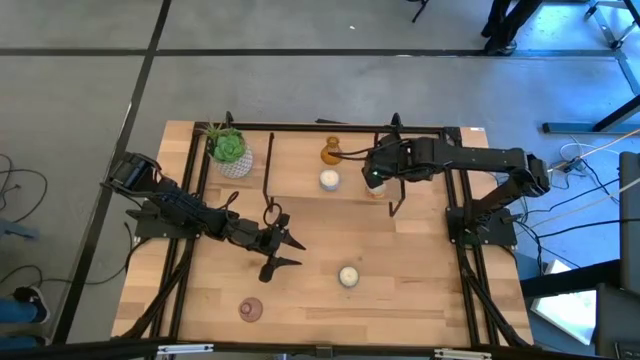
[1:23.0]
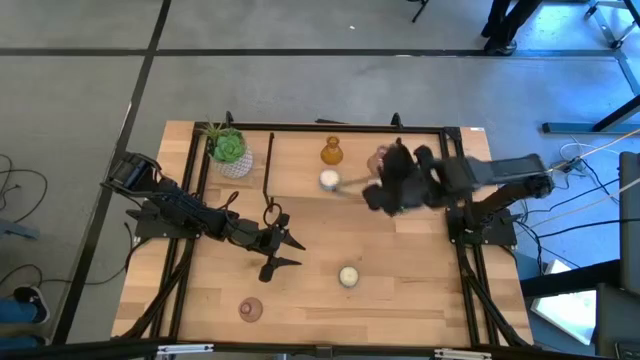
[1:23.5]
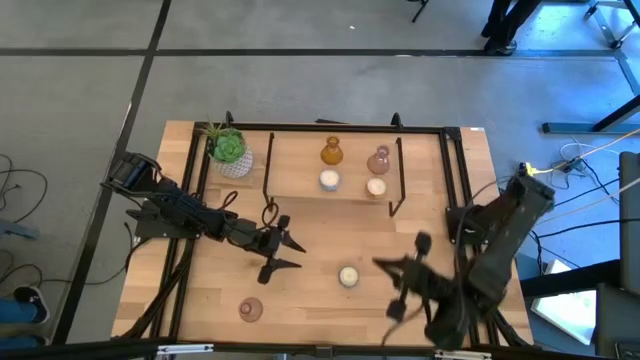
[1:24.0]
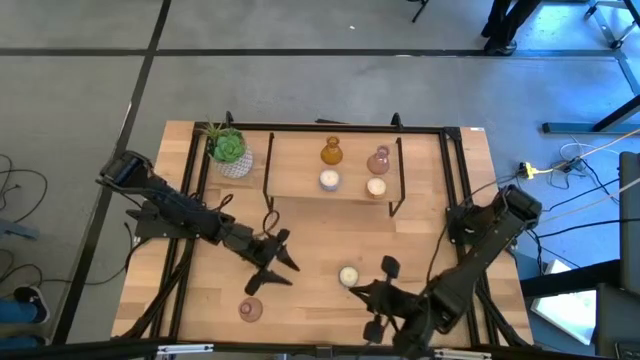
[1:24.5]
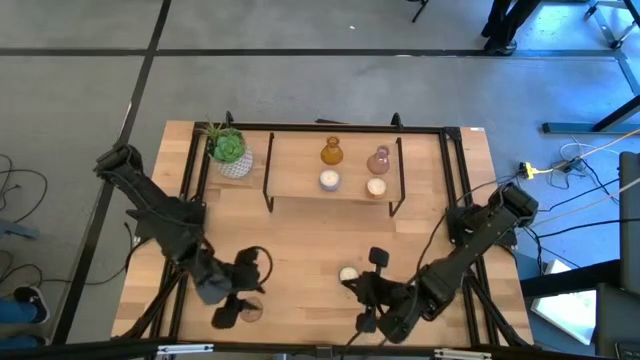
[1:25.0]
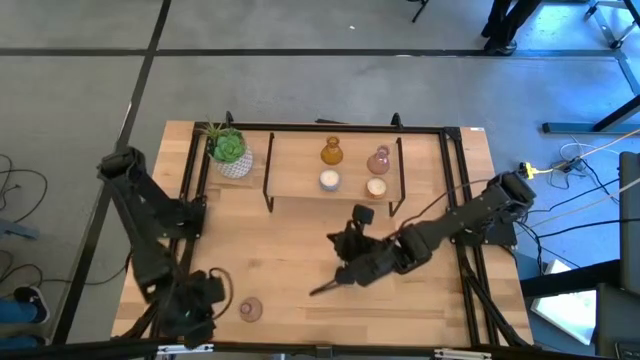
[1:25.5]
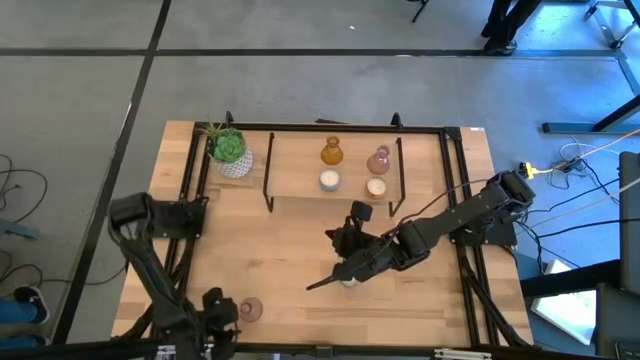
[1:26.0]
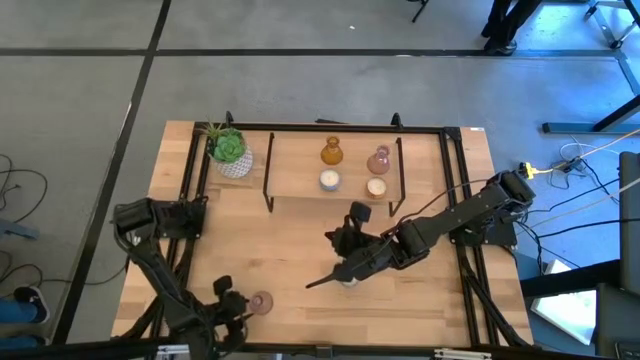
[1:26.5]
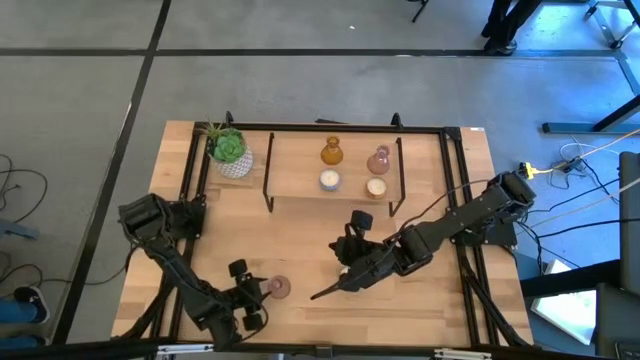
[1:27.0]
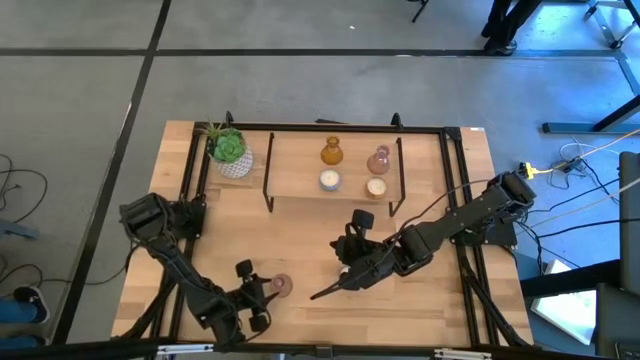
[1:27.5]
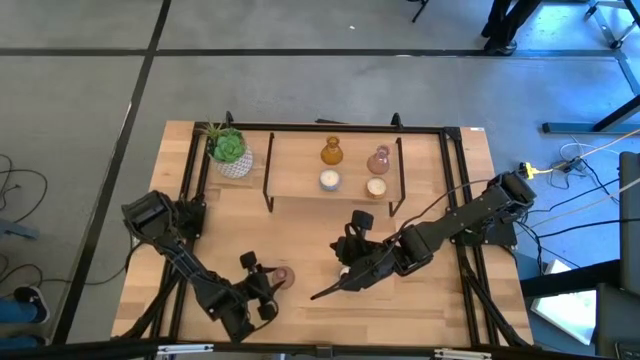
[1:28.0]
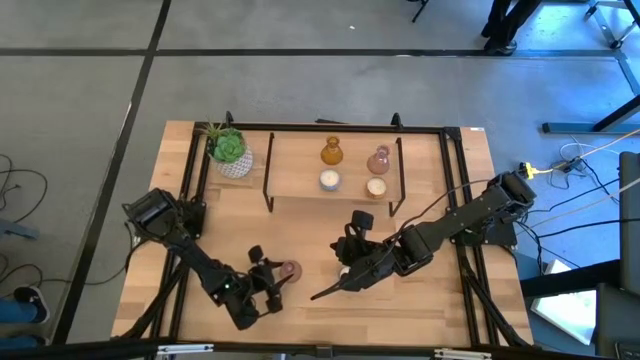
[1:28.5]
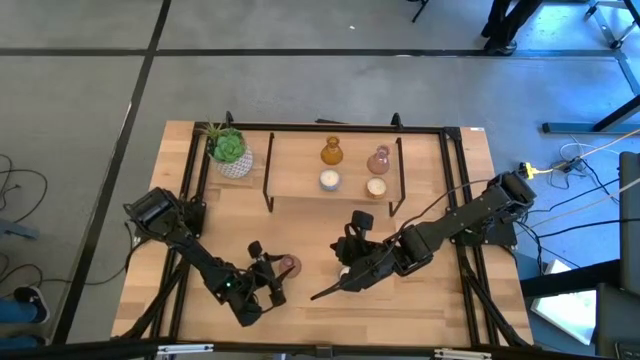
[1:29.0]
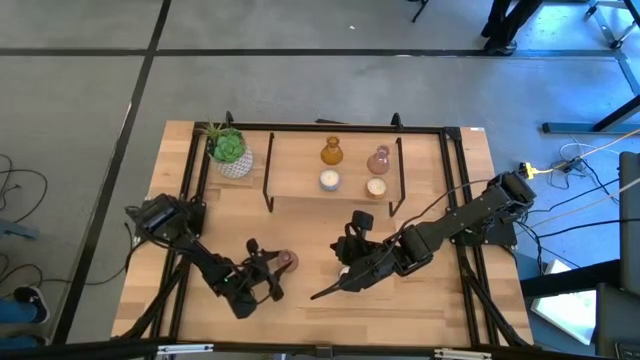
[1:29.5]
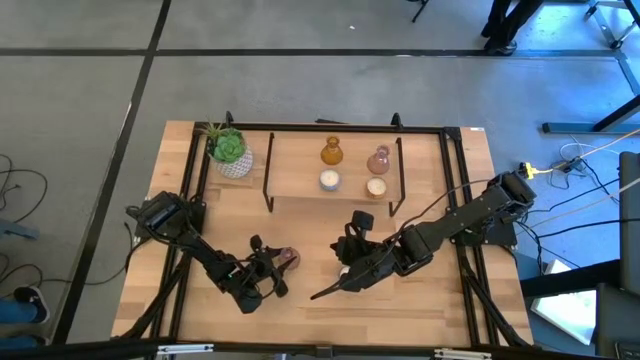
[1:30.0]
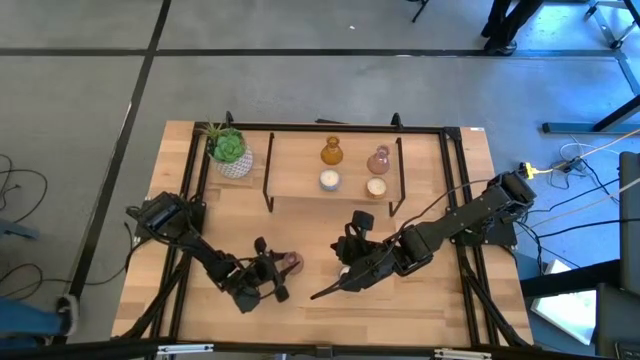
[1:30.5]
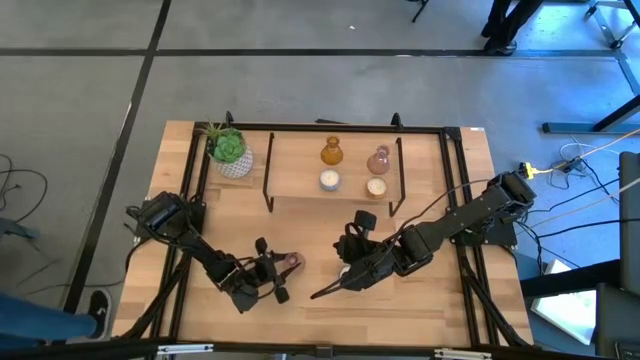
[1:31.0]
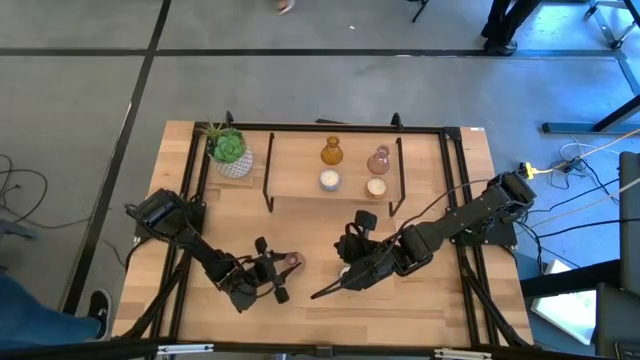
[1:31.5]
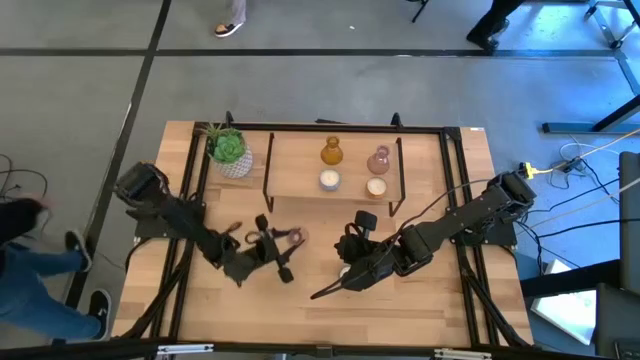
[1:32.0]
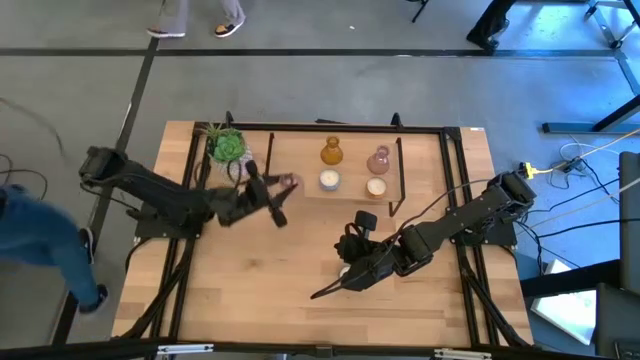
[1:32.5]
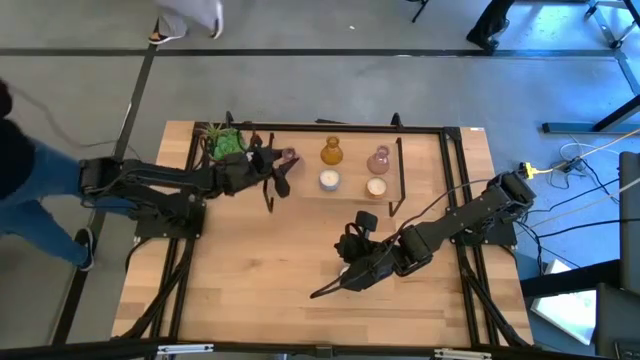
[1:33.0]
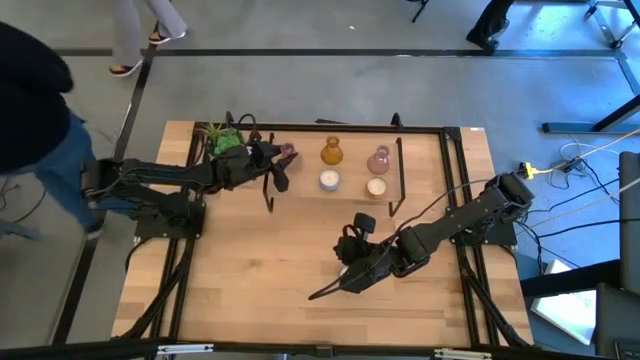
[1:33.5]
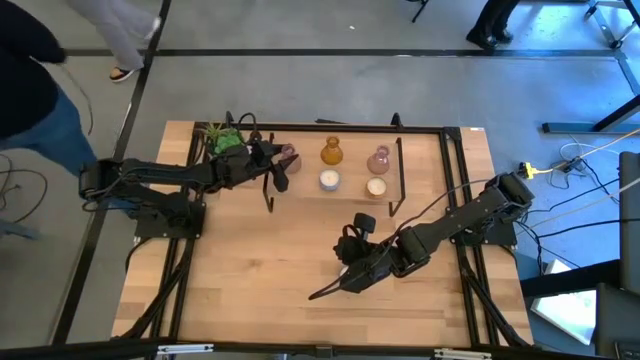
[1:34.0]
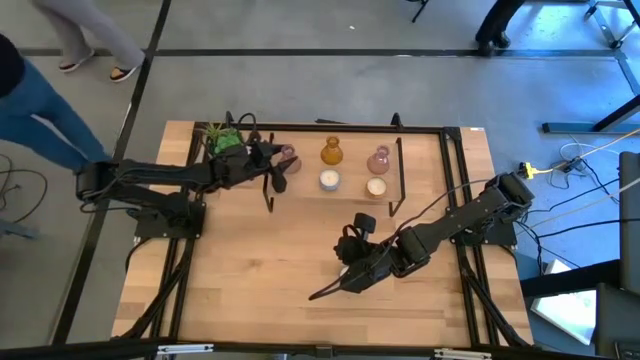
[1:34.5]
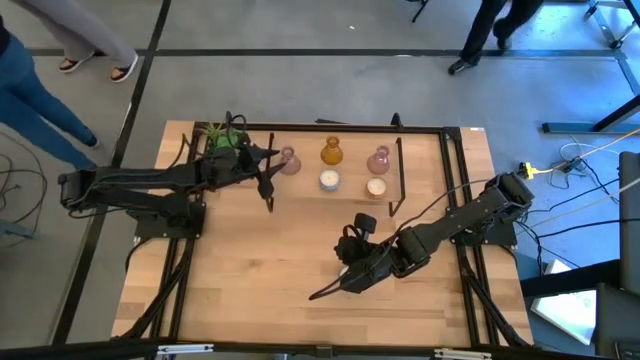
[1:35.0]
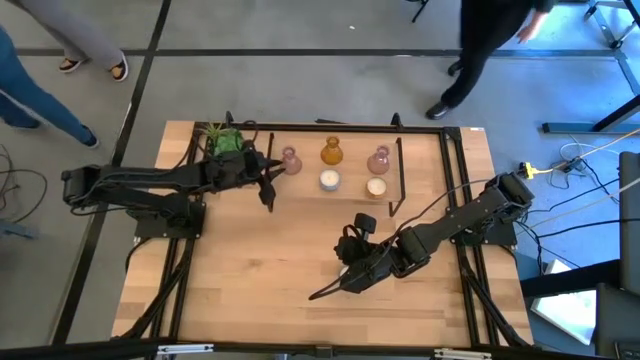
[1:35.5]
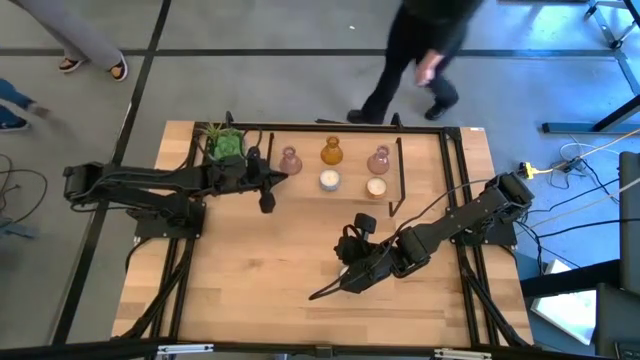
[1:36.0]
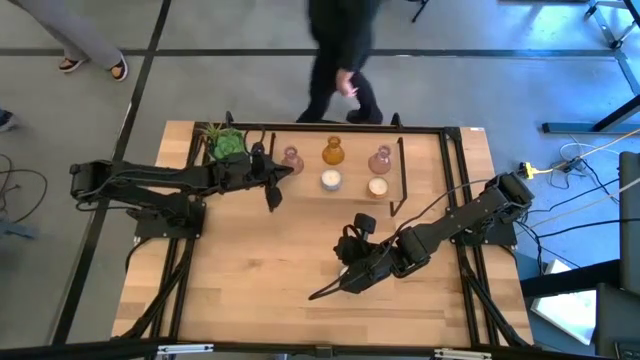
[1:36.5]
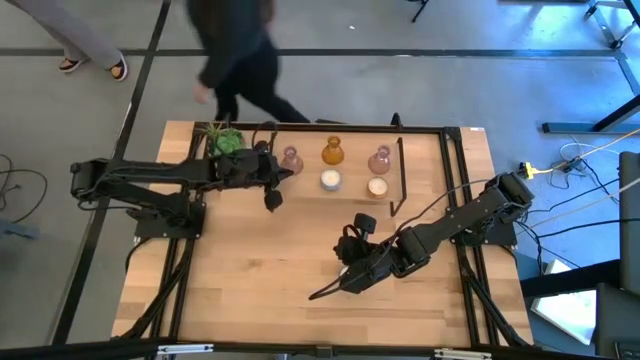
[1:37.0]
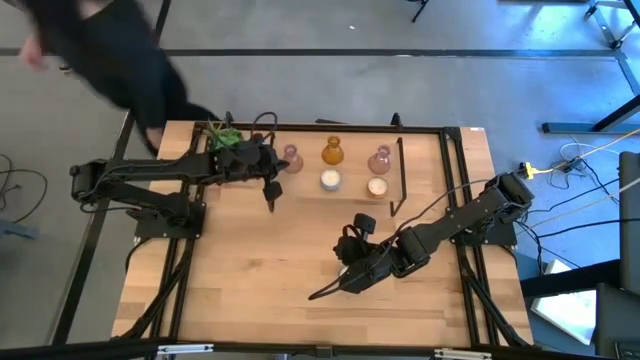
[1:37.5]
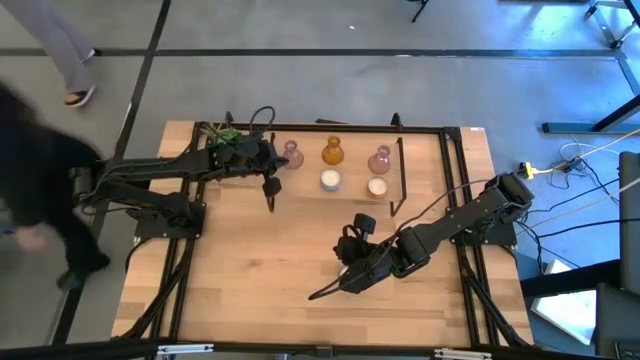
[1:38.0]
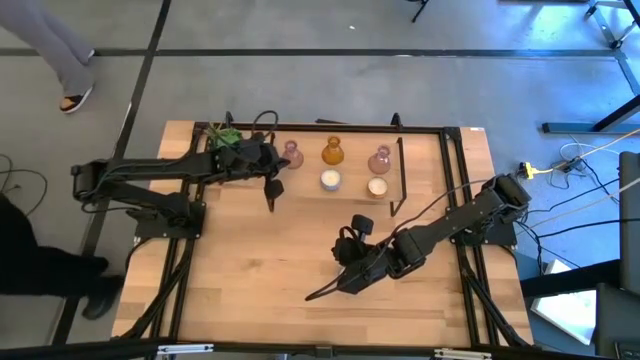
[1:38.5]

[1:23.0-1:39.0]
Task: Pick & Place candle stick holders
Put the pink candle holder on the shelf aligned with the yellow and pink candle holders

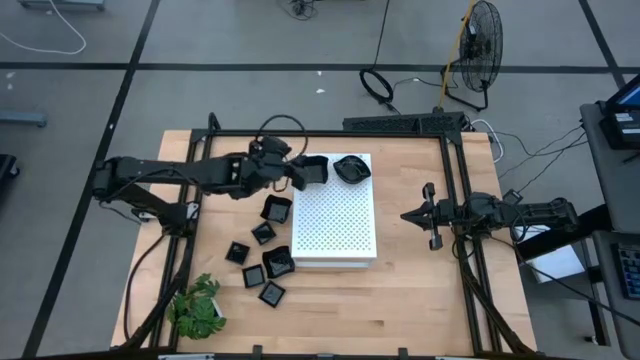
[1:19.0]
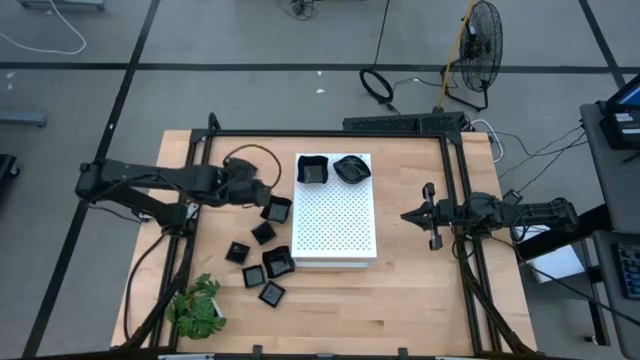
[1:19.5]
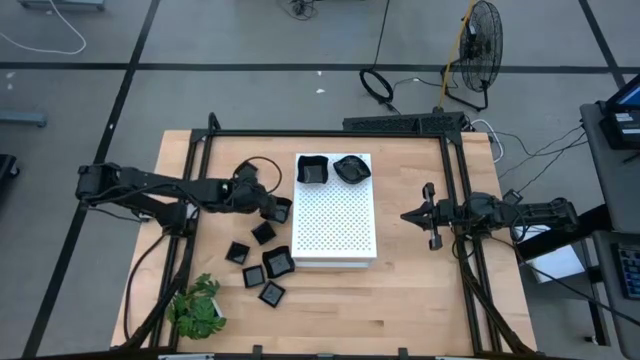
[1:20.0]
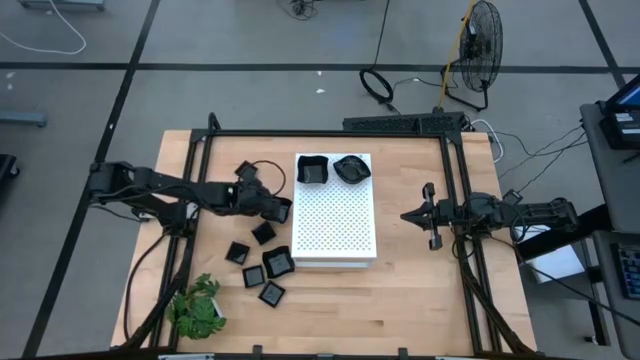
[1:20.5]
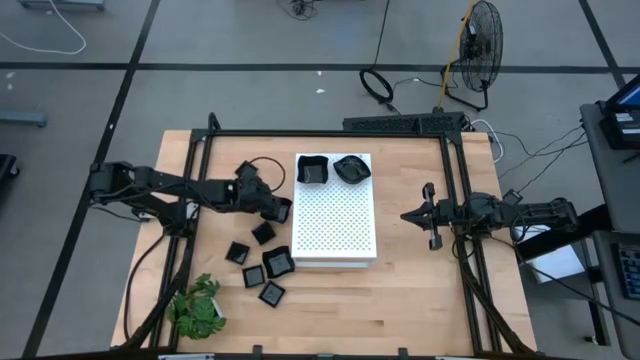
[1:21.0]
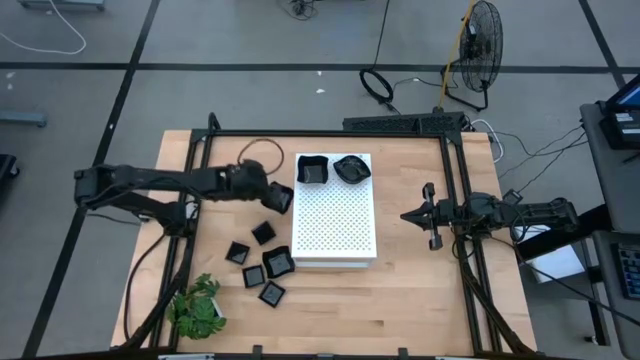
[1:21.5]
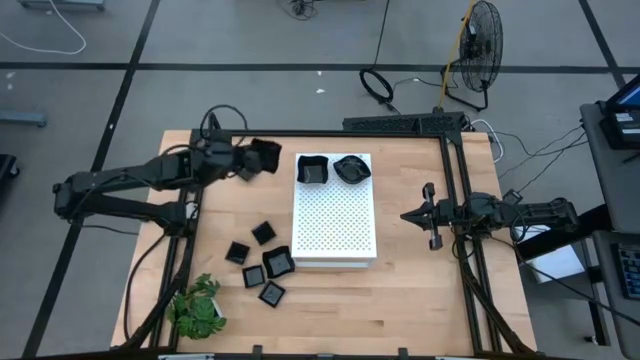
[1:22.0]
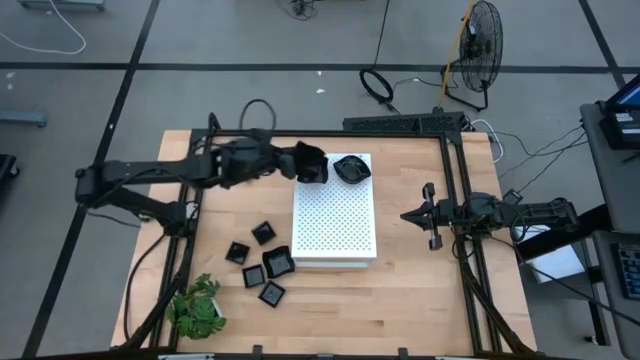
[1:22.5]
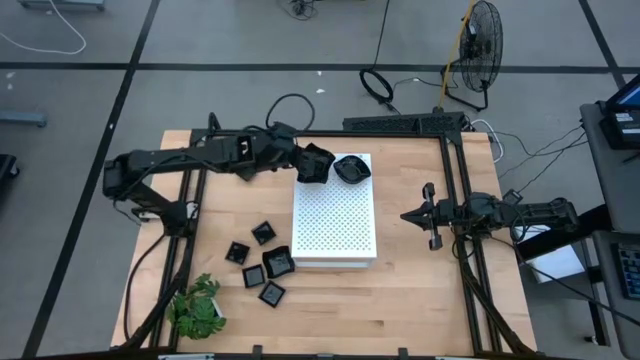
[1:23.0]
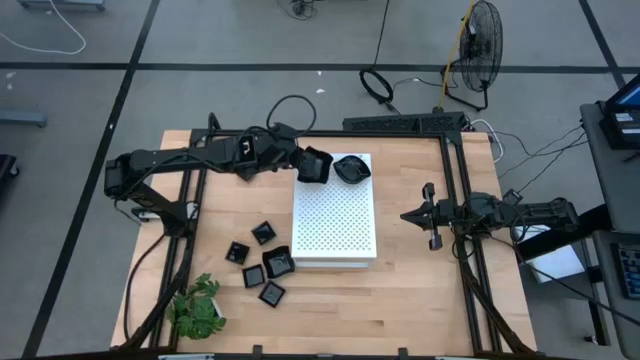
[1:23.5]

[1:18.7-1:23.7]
Task: Pick & Place Mini shaped plates
Stack the black distorted square plate on top of the other black distorted square plates on the shelf
